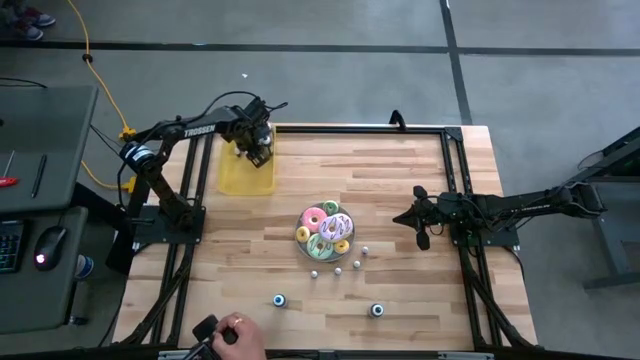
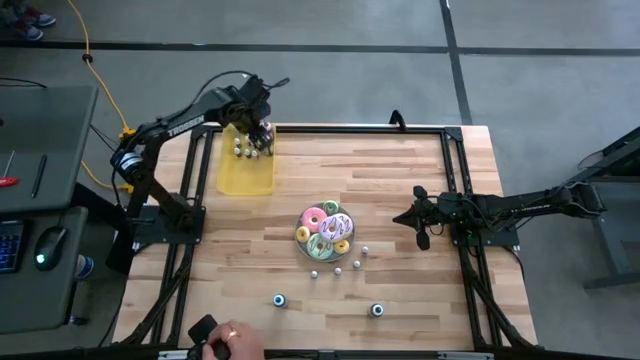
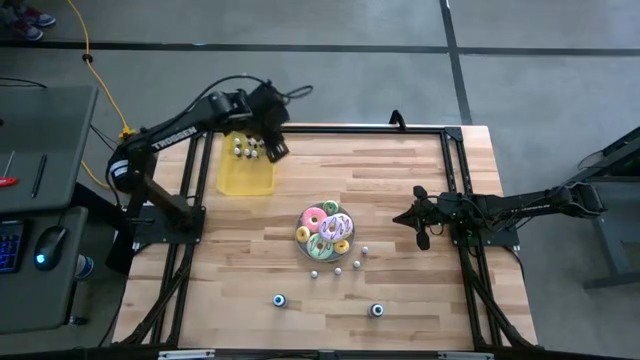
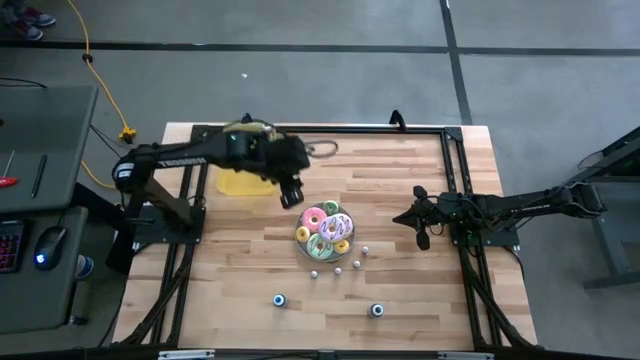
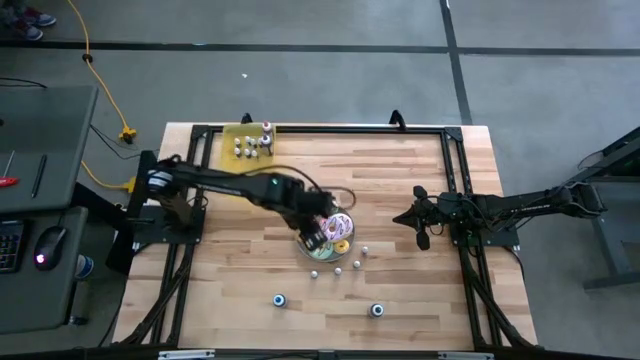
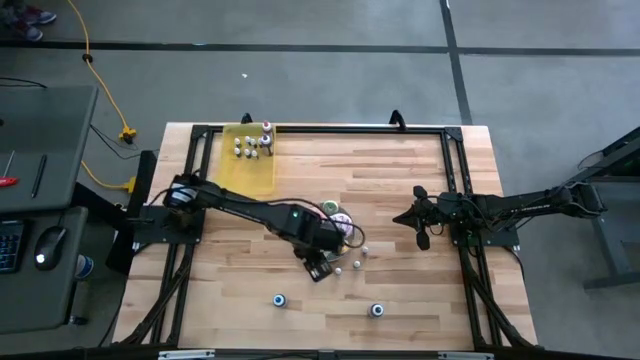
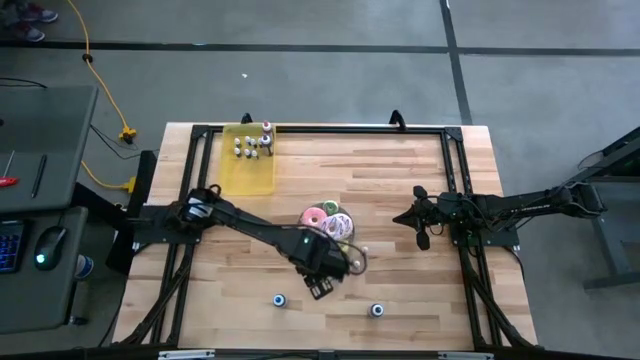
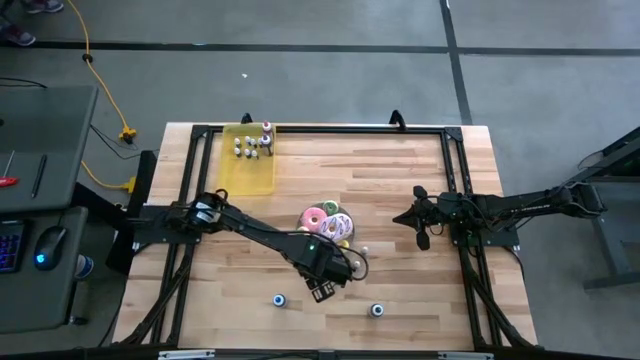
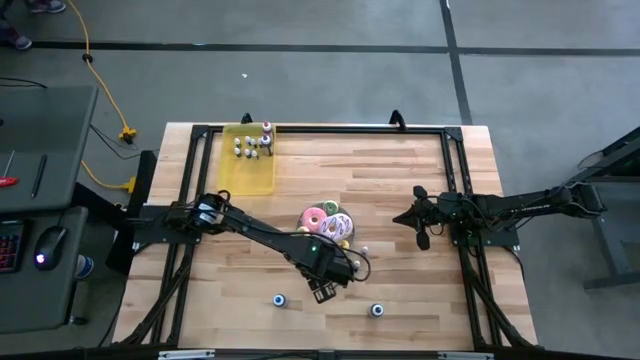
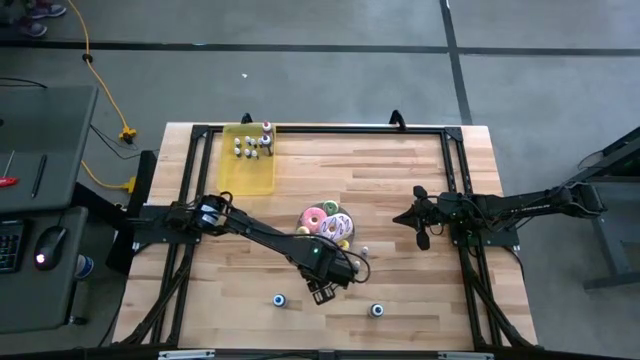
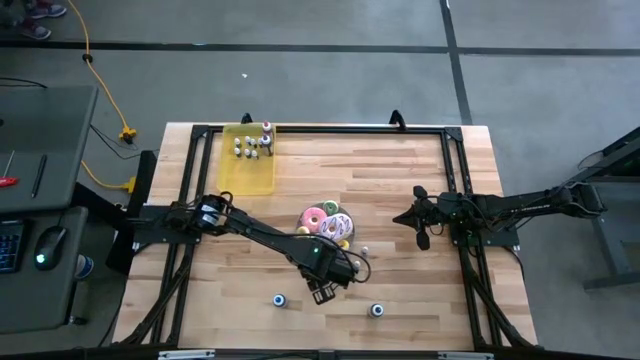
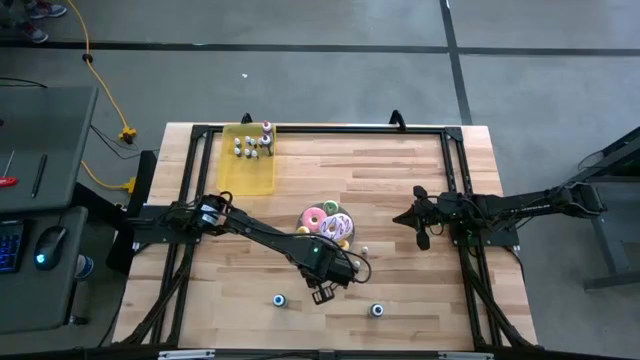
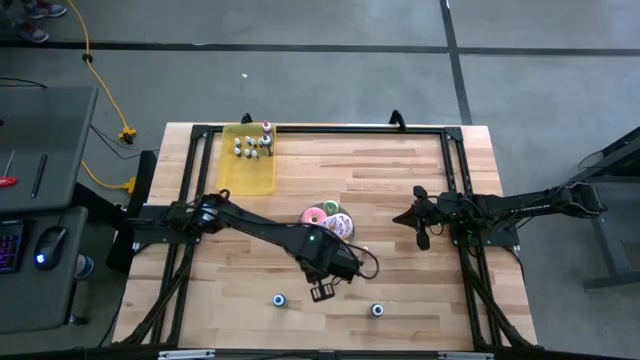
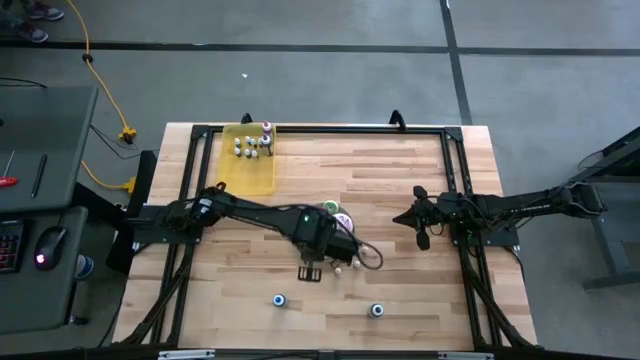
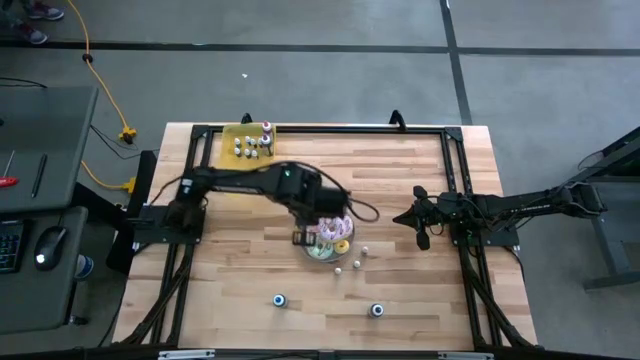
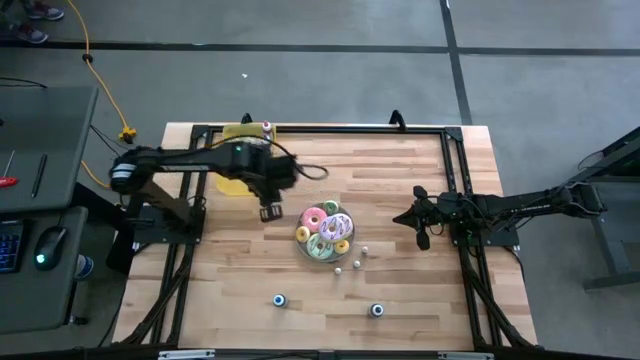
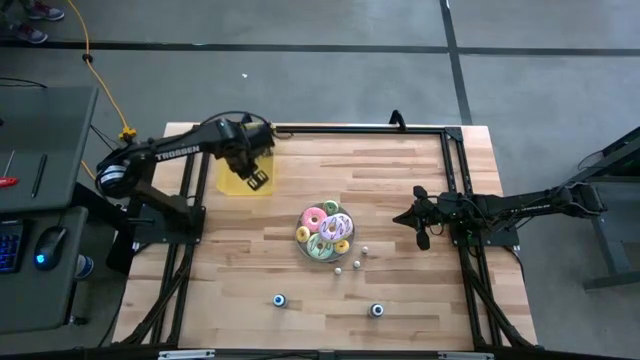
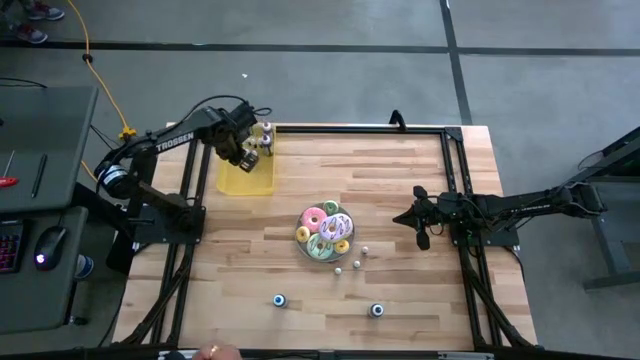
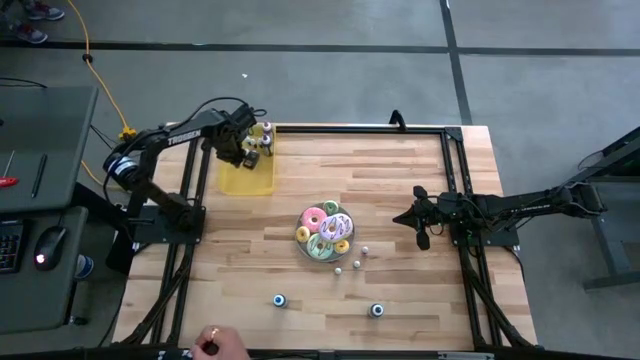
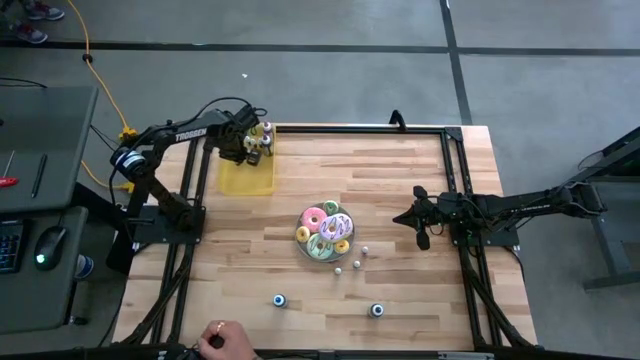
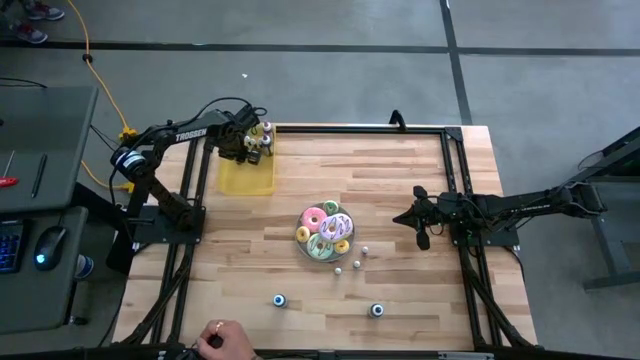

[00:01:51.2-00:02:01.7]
Task: Pick & Place food coloring
Put the small brown food coloring bottle into the yellow bin

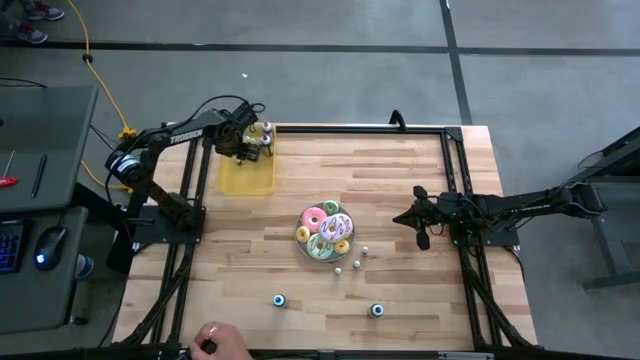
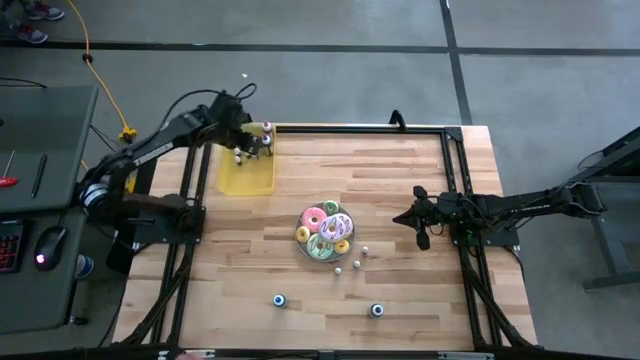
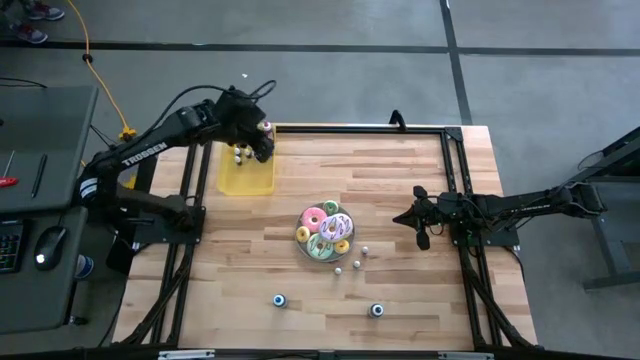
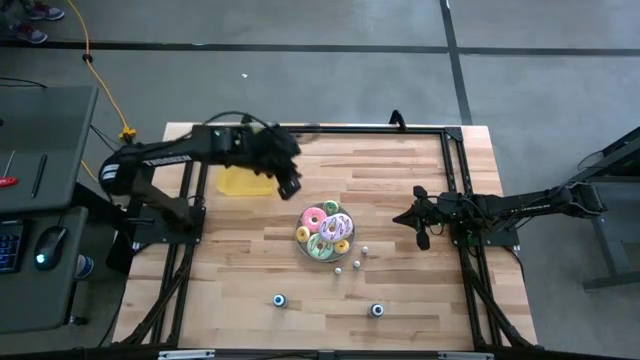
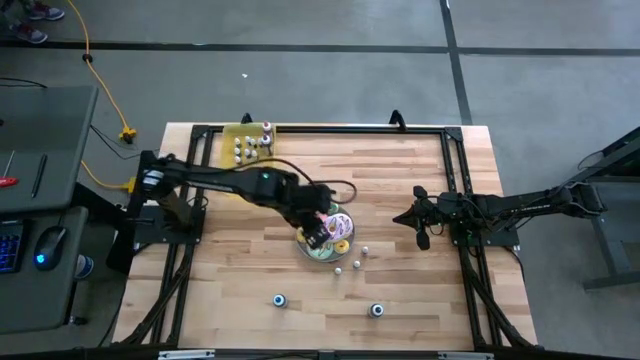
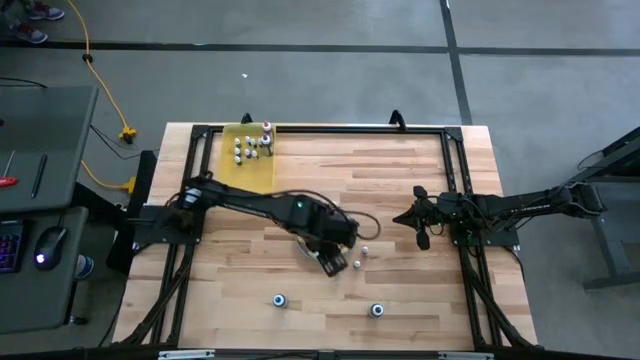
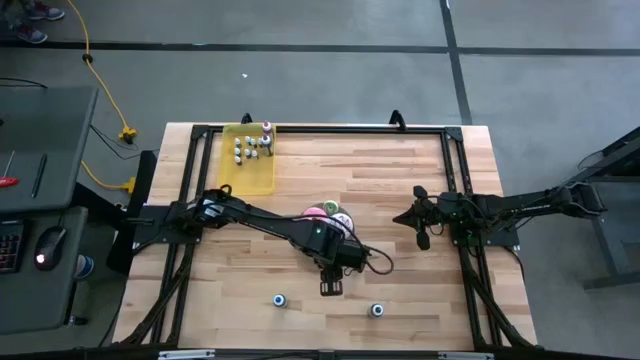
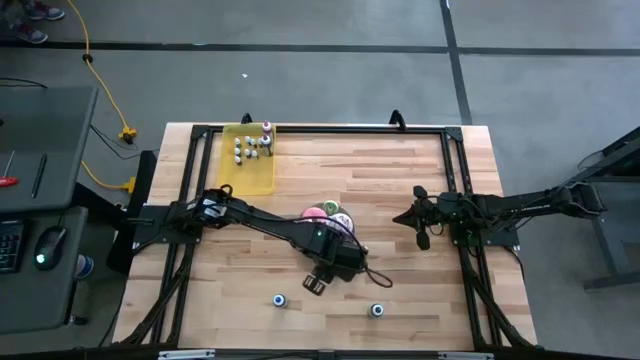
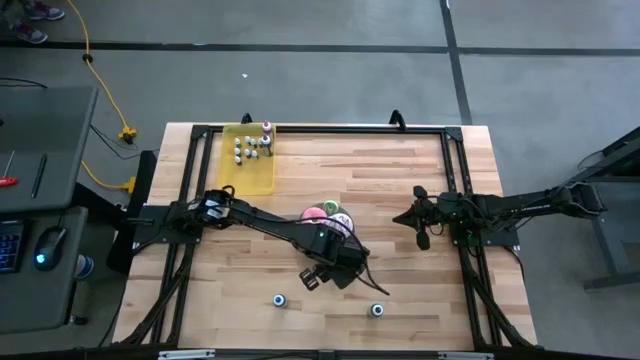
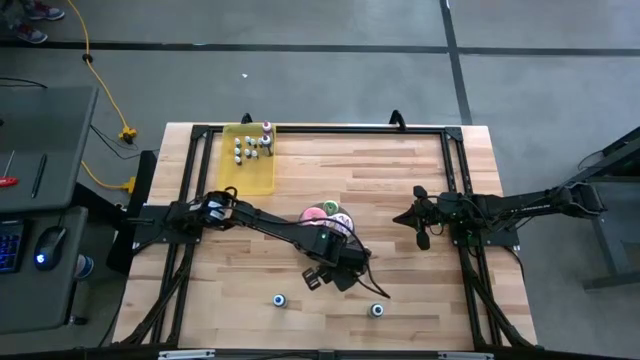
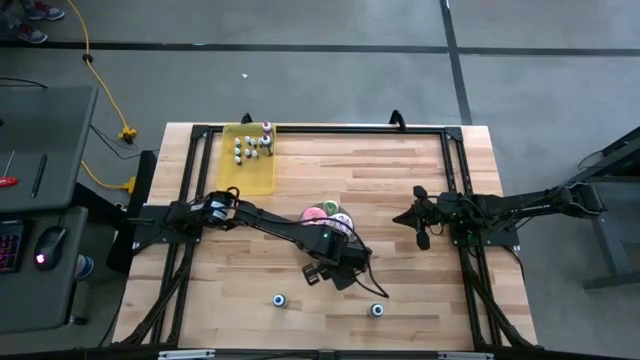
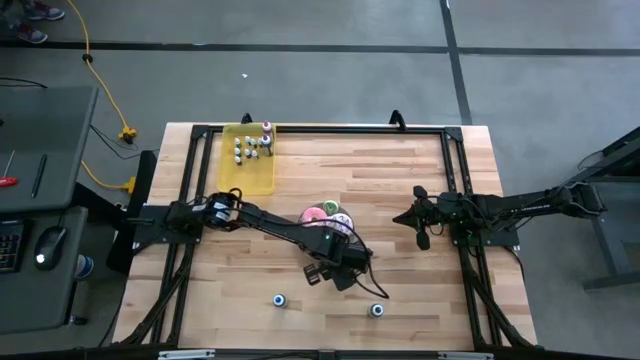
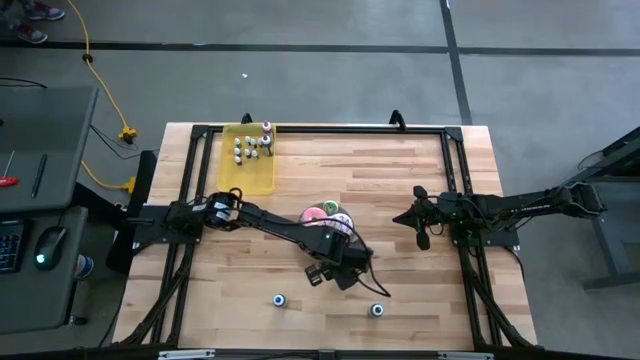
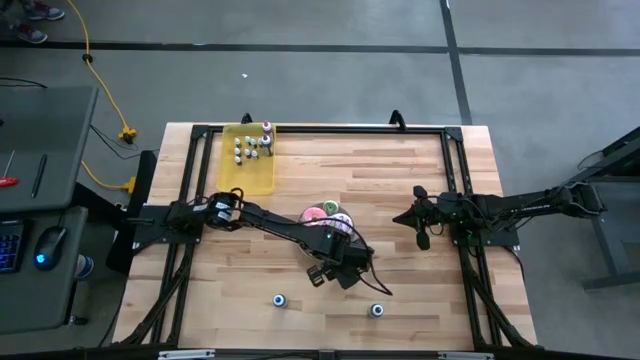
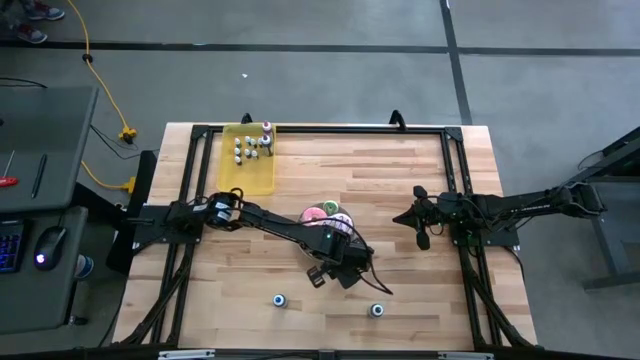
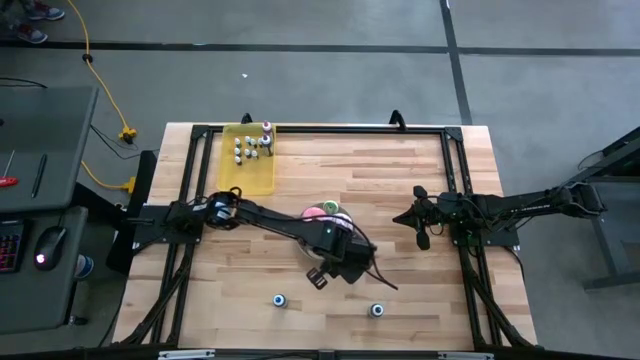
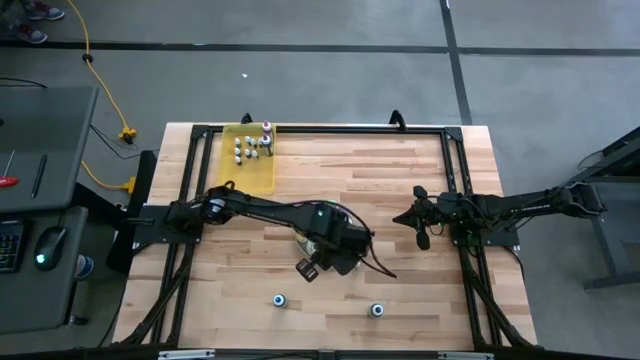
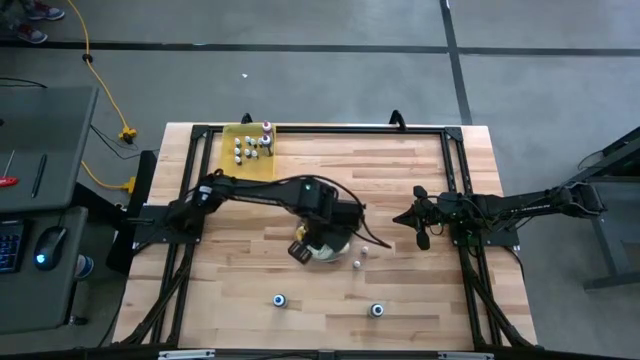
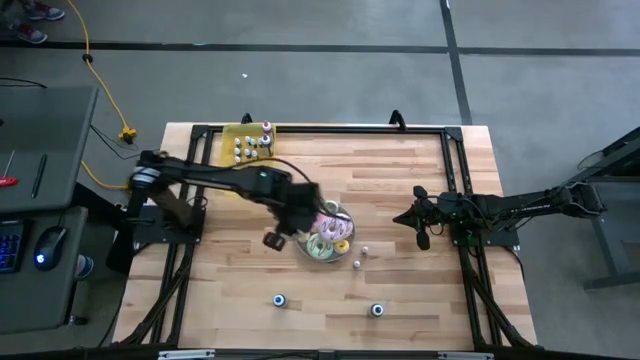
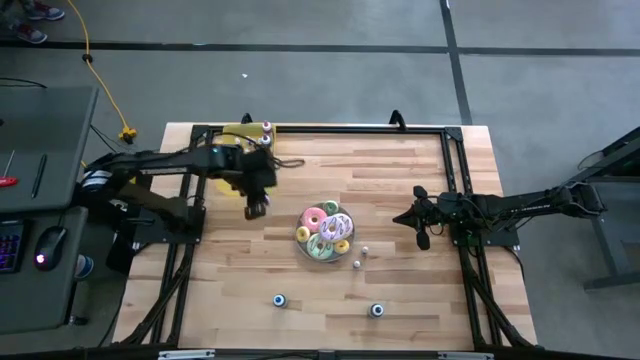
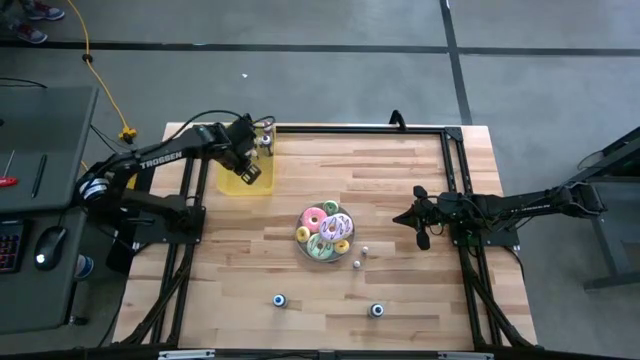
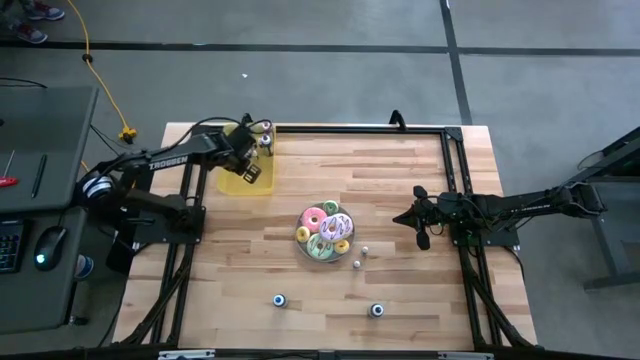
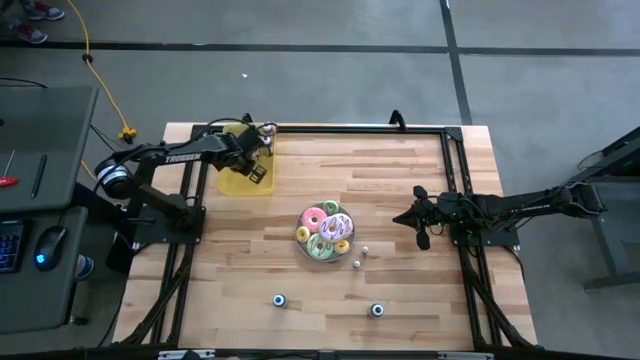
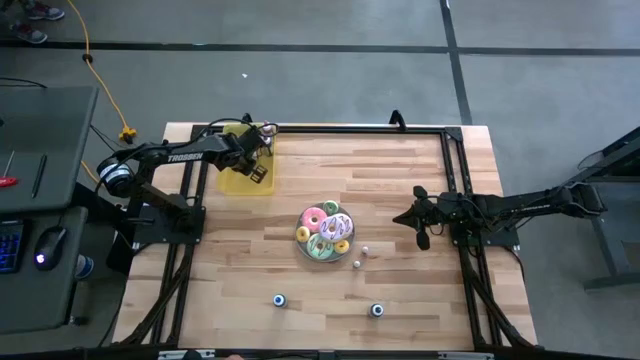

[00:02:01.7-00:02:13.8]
Put the small black food coloring bottle into the yellow bin
